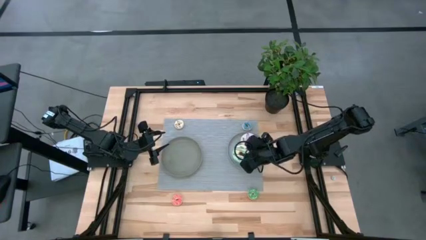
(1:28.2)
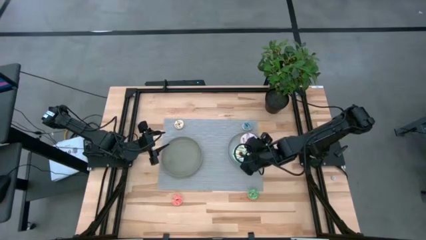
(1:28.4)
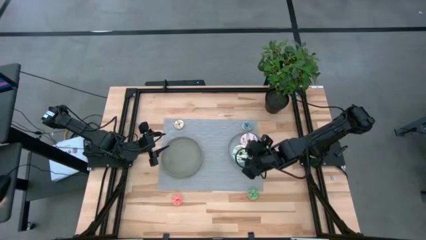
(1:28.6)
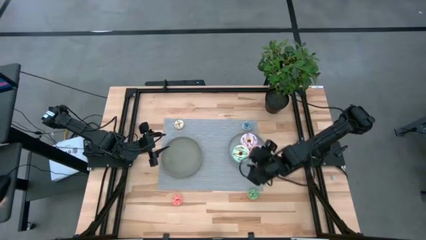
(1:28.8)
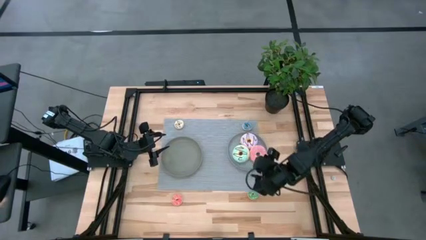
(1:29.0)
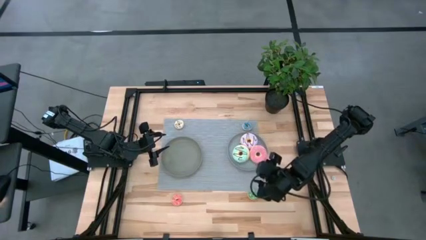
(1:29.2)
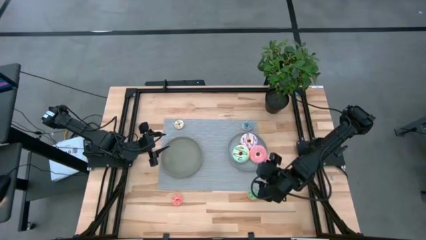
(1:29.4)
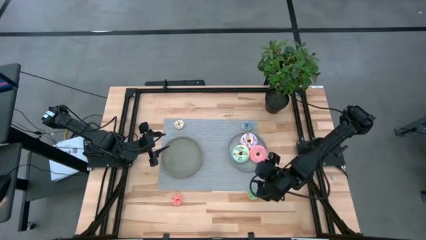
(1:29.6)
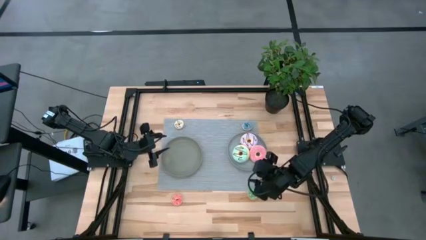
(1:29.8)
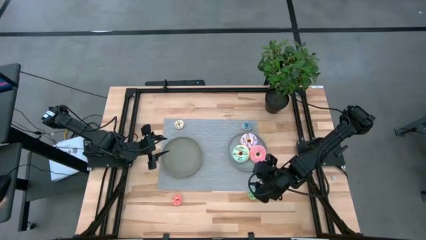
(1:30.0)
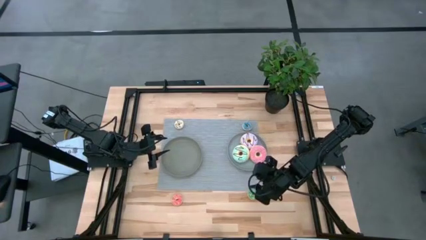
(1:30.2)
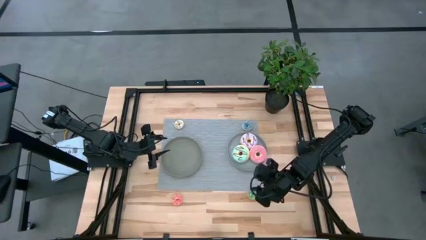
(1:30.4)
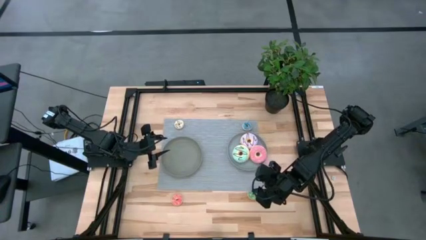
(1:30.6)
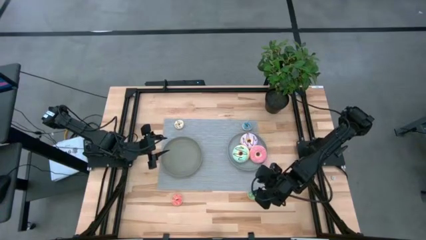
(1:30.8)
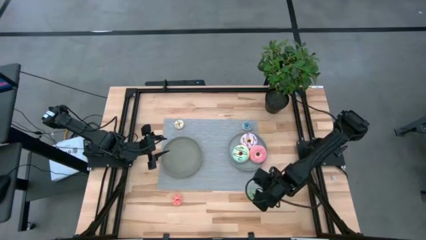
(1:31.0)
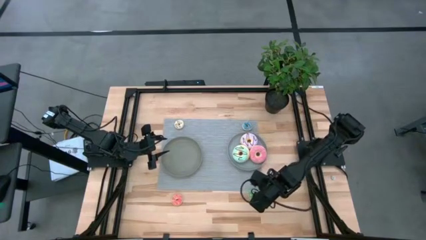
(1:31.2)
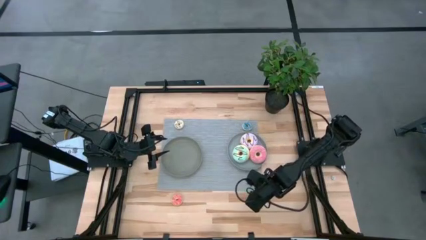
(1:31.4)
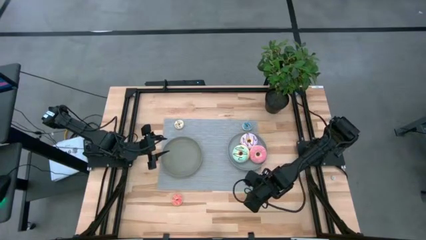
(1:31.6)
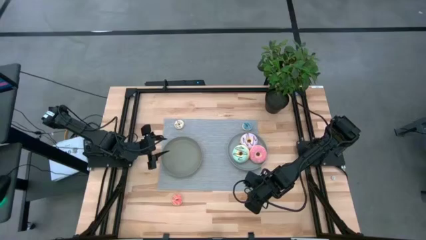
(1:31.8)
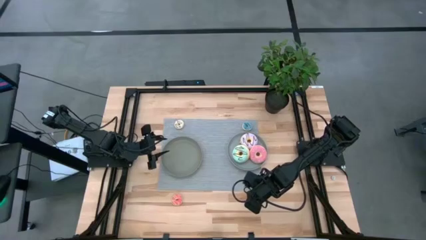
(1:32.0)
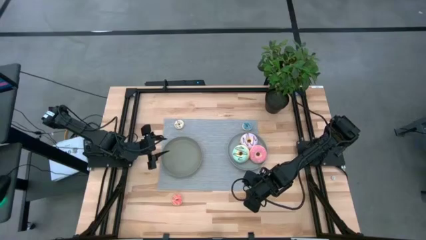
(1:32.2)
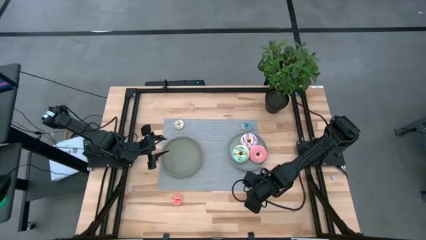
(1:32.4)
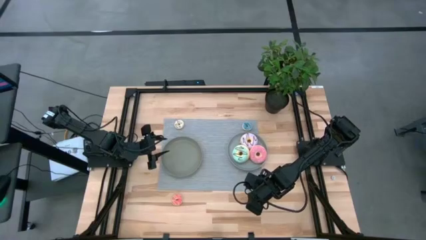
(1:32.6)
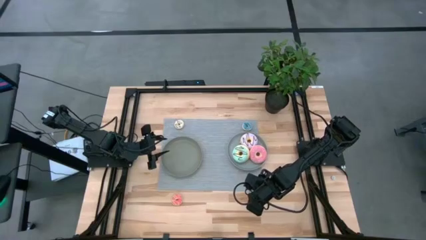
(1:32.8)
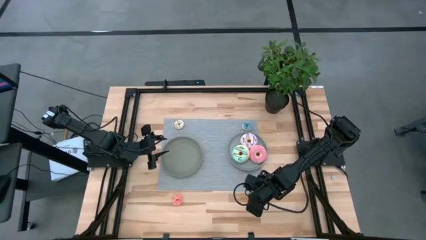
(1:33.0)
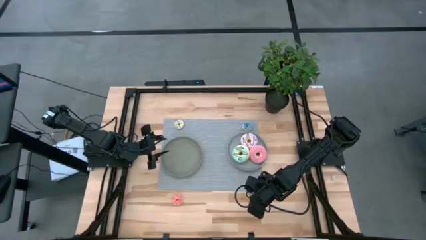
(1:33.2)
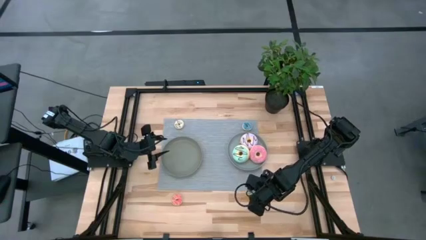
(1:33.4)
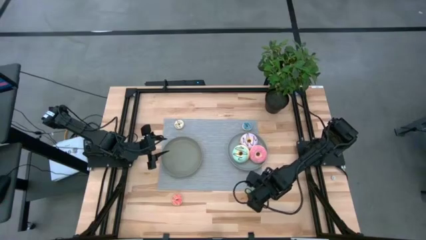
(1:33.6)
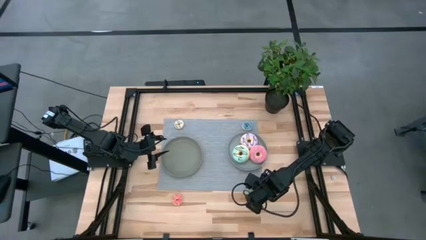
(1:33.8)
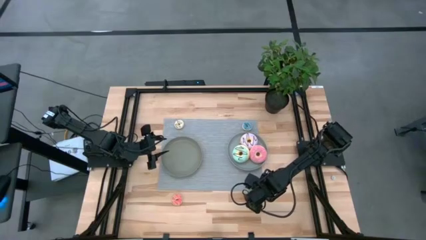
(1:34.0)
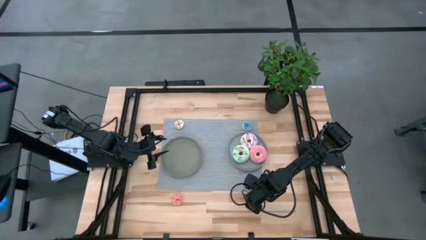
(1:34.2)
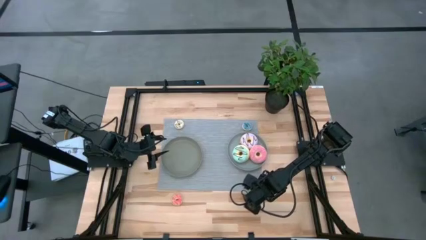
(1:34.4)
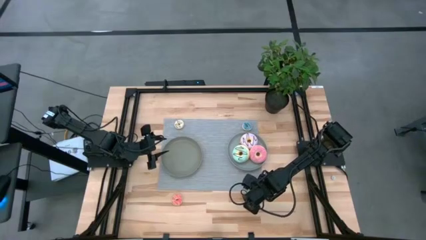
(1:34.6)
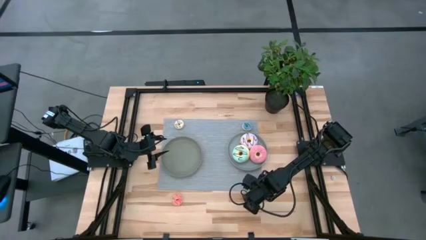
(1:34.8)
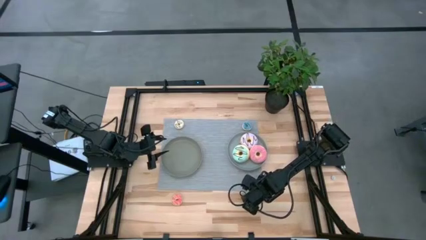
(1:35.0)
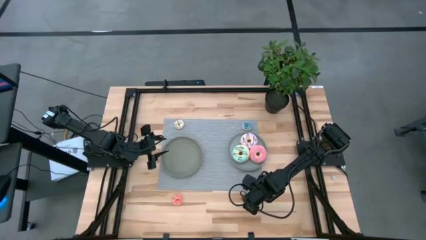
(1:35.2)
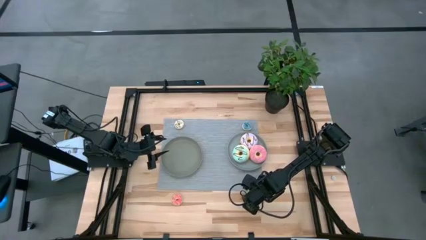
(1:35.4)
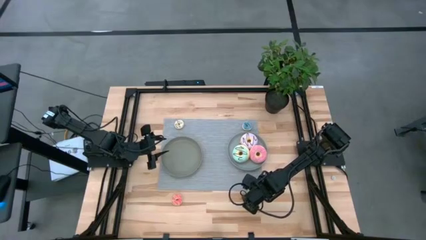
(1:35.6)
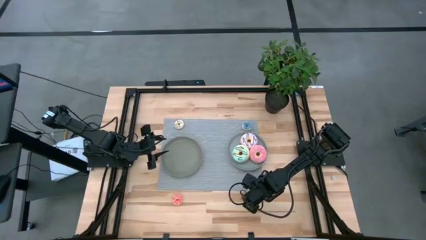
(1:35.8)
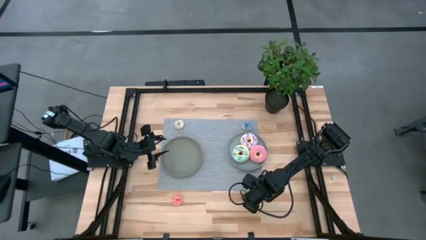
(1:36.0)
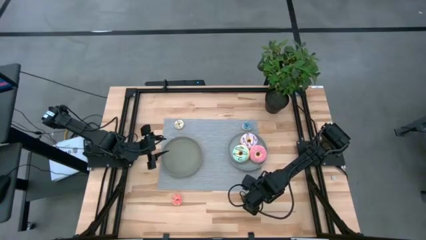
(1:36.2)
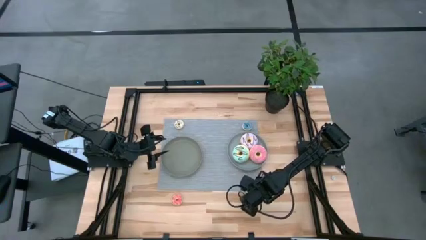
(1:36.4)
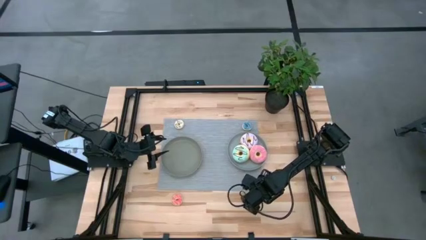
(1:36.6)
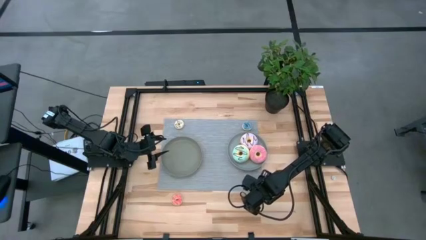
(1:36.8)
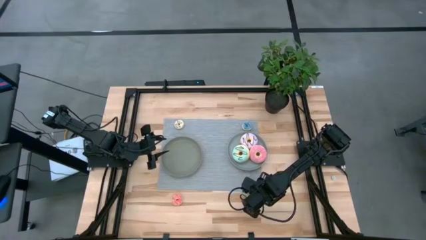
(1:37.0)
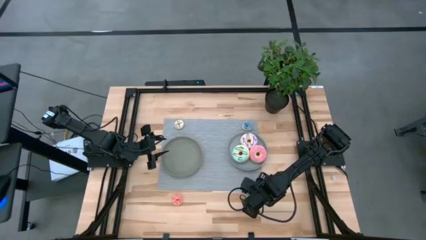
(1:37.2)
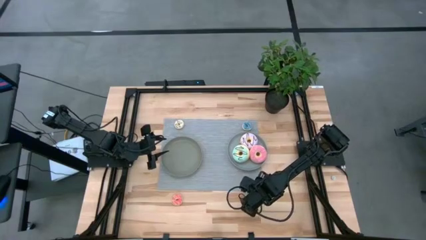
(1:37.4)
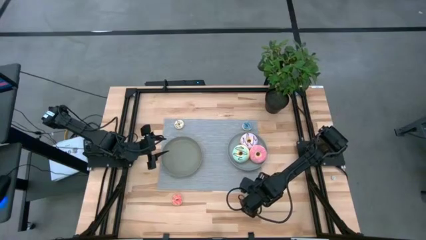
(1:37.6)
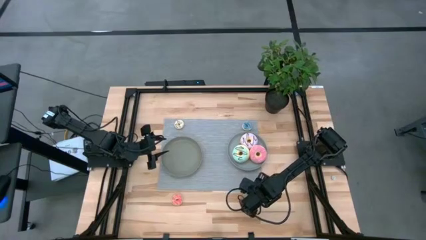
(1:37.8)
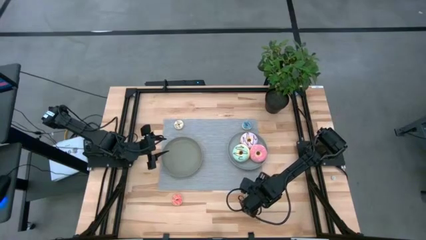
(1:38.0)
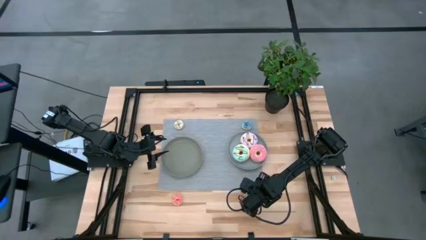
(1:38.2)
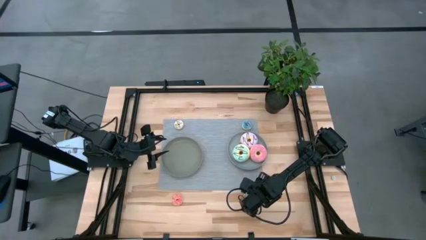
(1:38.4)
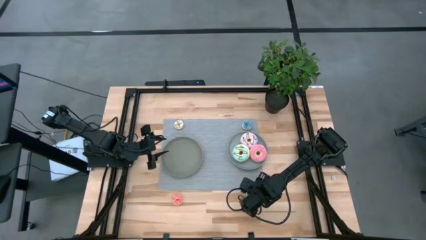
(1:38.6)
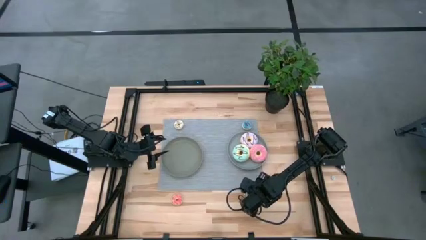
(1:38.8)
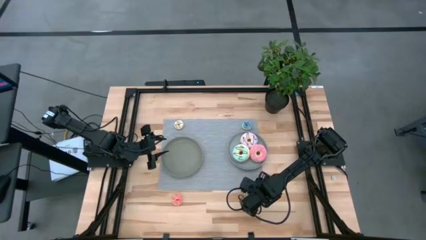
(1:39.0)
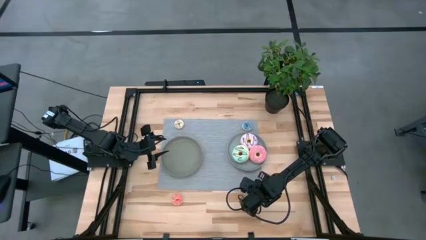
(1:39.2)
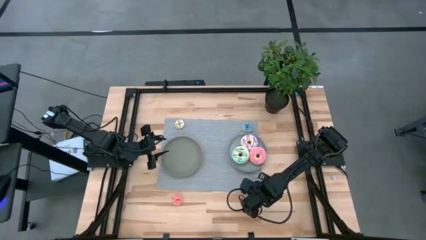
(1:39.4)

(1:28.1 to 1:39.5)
Task: Pick & Place donuts
Put the small green donut into the green plate

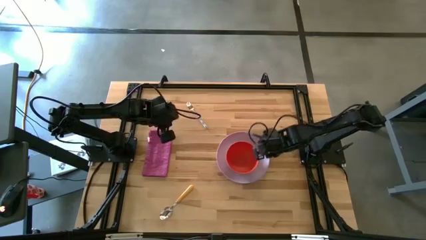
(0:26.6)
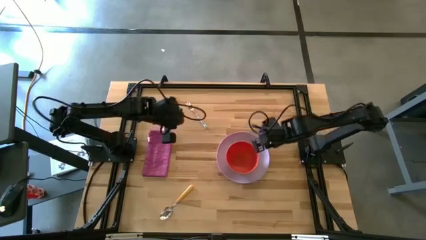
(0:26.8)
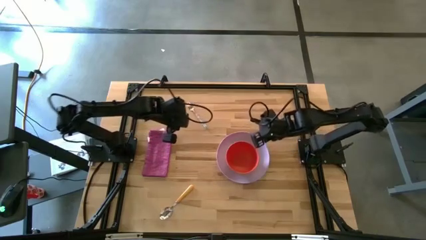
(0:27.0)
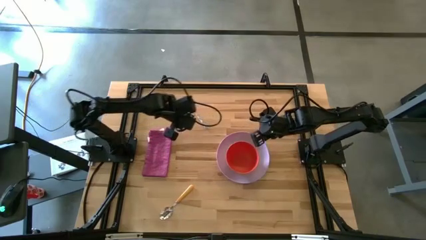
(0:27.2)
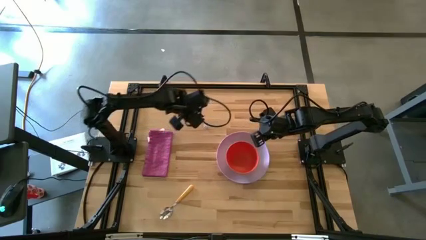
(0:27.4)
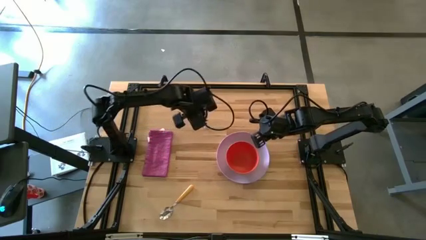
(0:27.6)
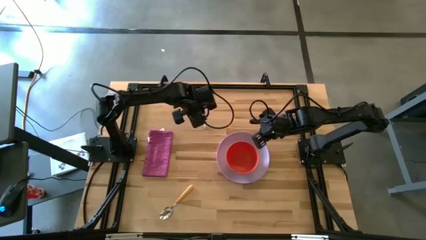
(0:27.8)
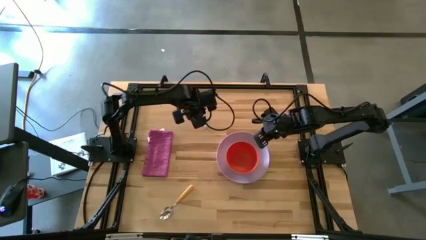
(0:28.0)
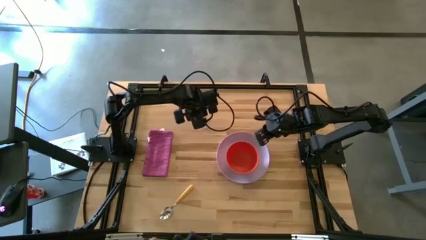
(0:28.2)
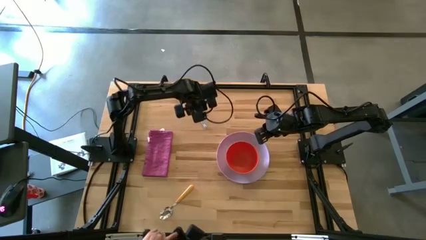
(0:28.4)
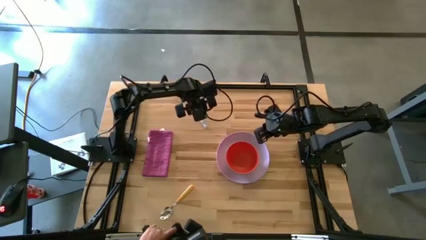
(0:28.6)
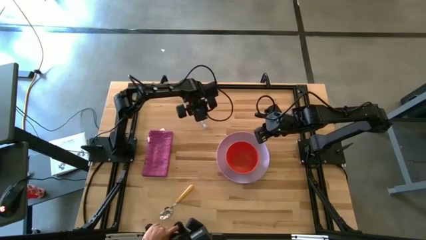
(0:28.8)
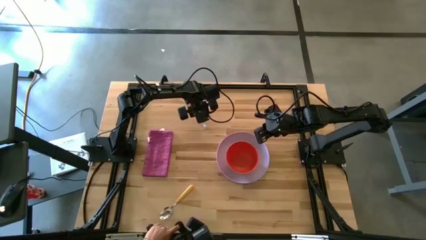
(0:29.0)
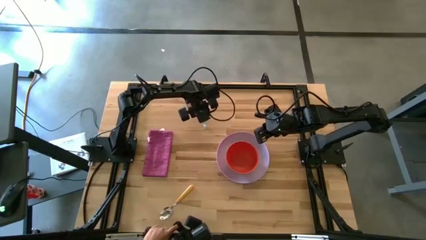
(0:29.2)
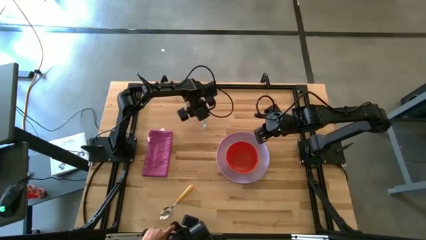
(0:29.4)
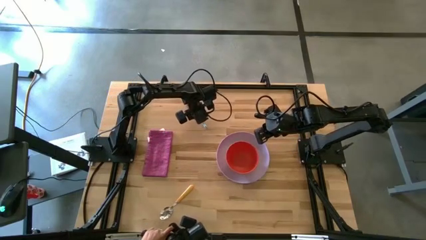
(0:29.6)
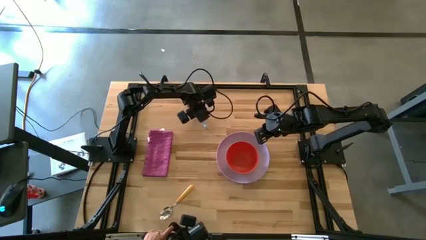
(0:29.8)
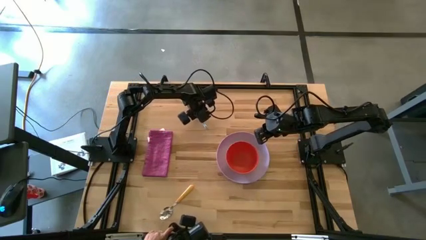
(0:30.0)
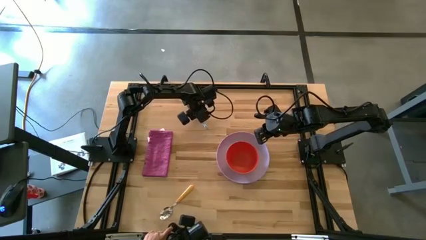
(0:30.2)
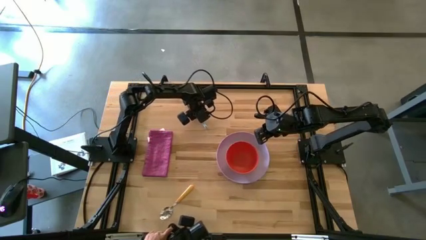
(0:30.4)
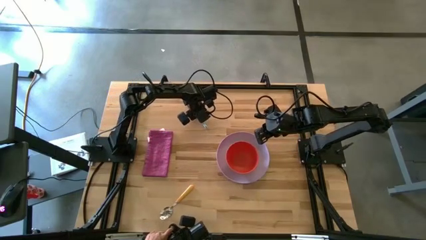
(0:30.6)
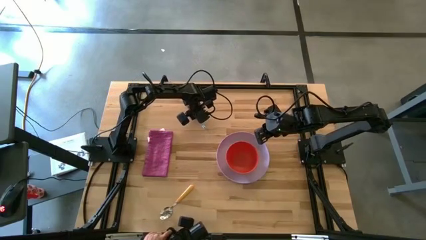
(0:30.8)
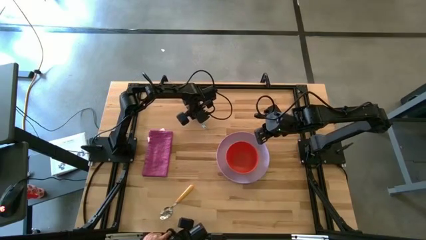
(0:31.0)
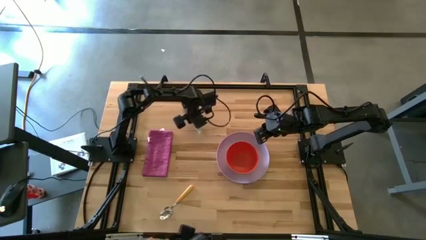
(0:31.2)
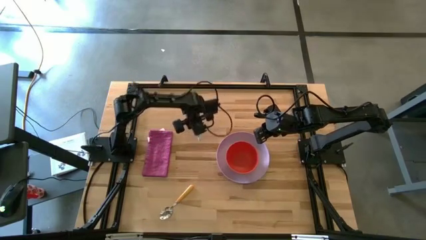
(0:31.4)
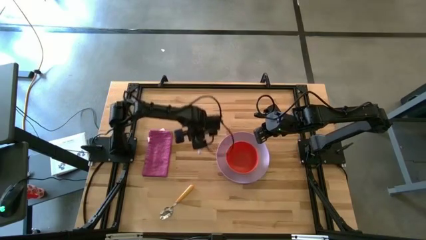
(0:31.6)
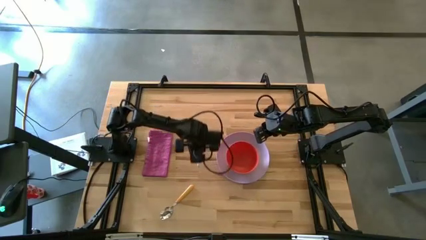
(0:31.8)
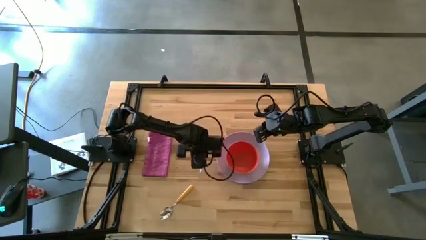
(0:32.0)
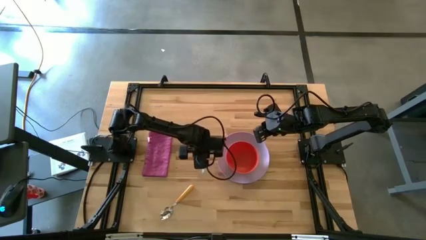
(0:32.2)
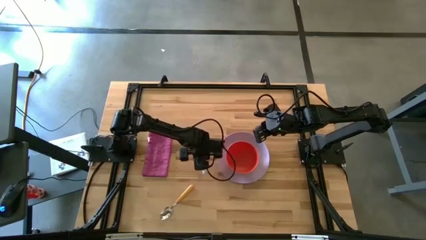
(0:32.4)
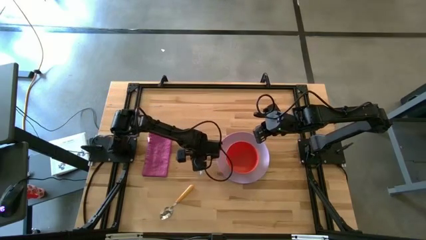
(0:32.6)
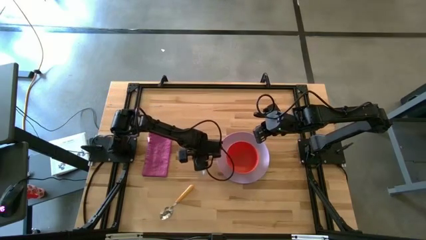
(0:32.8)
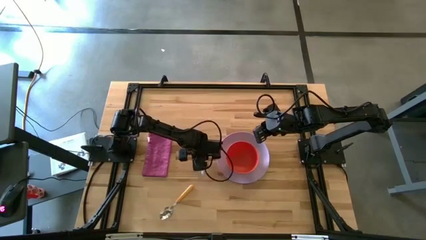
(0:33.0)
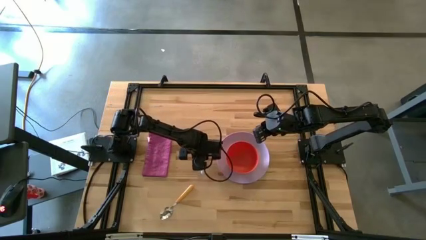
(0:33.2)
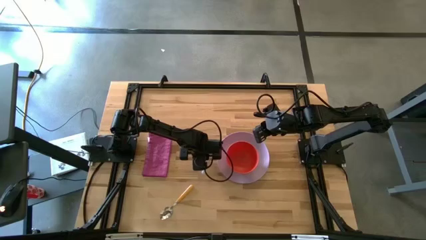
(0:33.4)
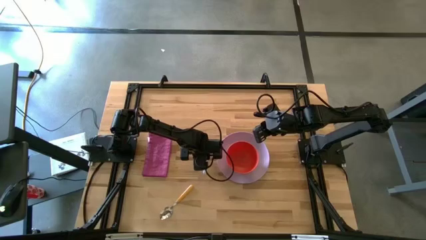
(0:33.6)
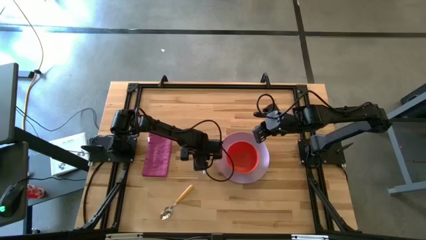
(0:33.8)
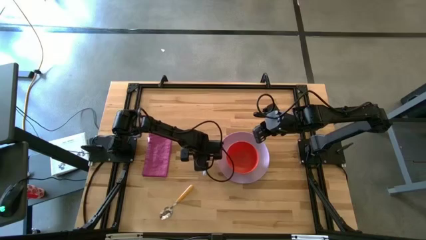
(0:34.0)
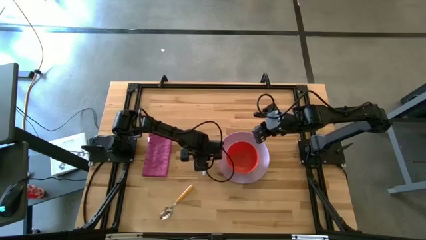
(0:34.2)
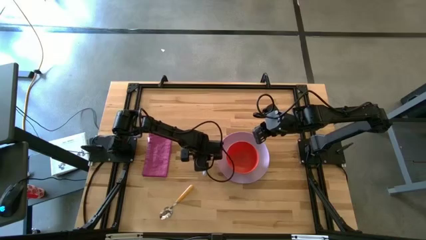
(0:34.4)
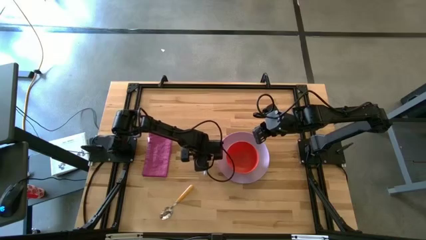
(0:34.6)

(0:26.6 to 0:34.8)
Task: Set table place
Put the silver fork to the left of the purple plate
